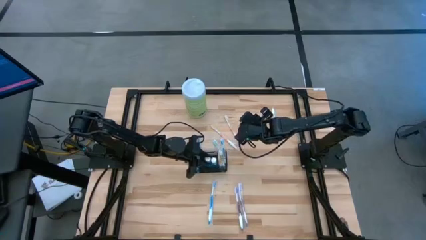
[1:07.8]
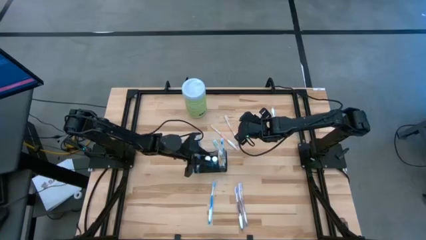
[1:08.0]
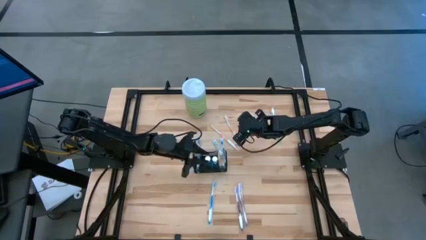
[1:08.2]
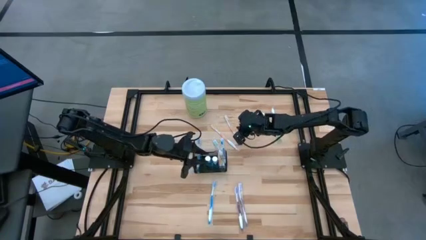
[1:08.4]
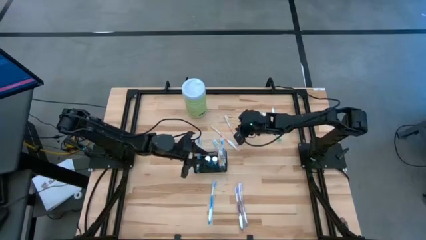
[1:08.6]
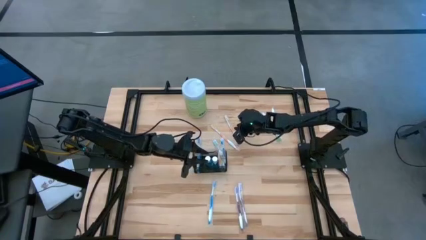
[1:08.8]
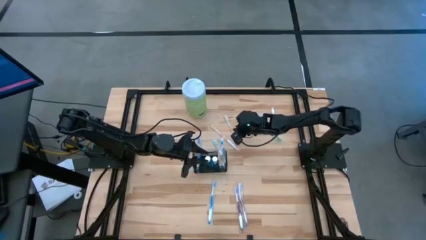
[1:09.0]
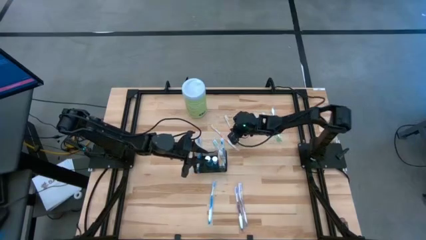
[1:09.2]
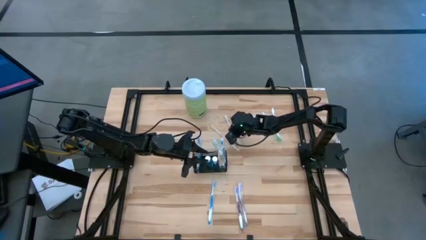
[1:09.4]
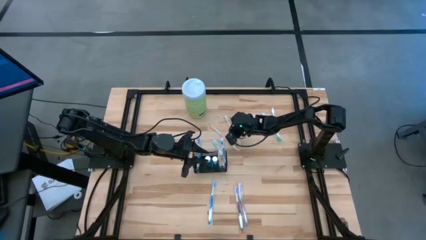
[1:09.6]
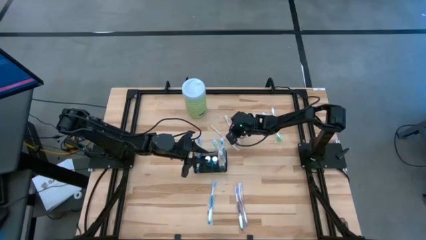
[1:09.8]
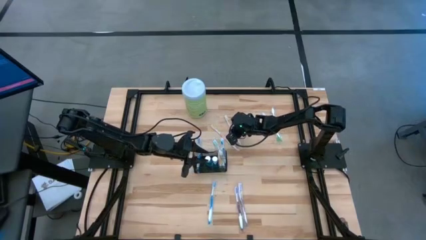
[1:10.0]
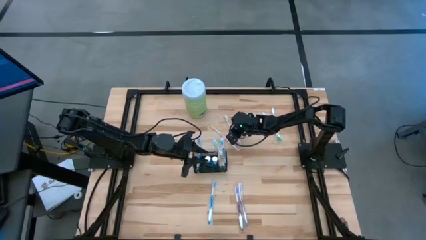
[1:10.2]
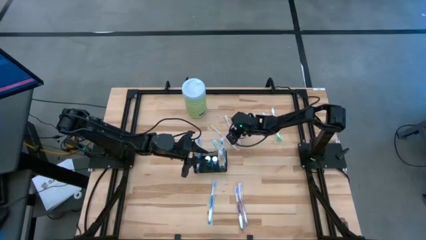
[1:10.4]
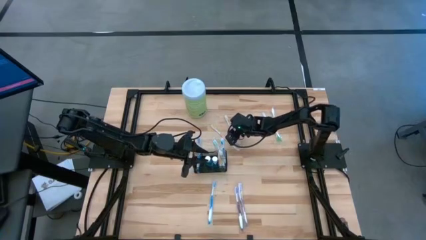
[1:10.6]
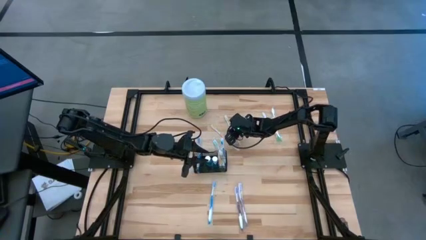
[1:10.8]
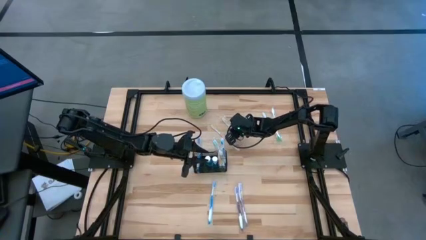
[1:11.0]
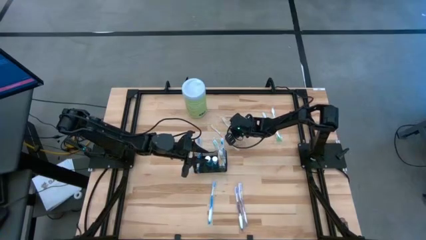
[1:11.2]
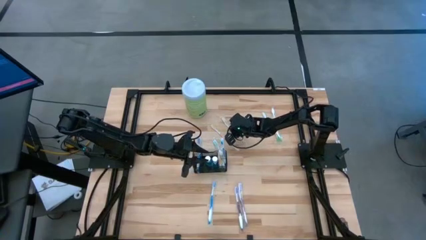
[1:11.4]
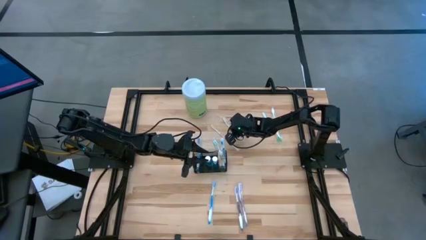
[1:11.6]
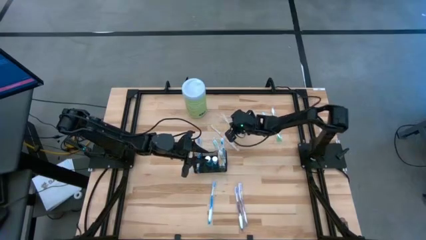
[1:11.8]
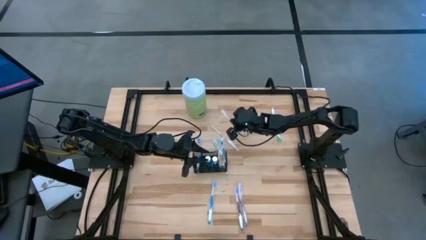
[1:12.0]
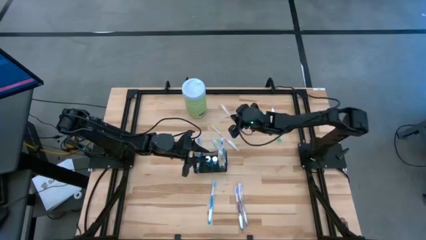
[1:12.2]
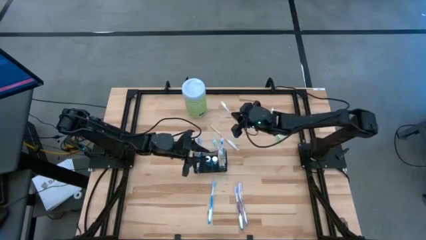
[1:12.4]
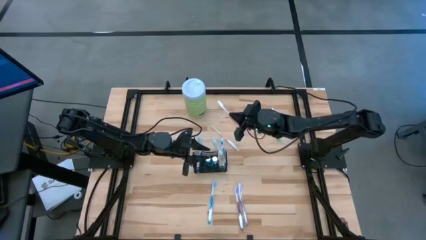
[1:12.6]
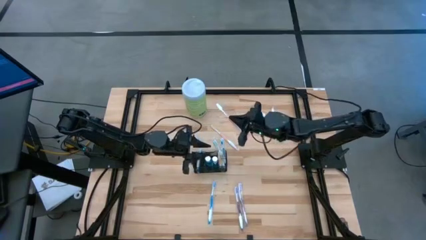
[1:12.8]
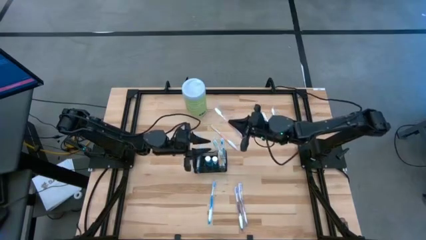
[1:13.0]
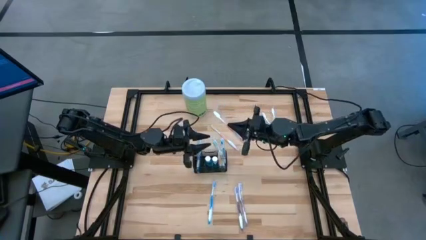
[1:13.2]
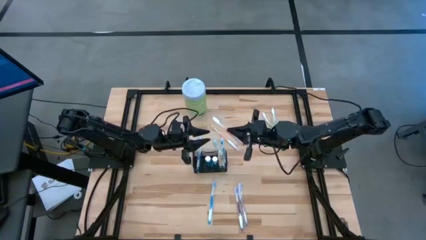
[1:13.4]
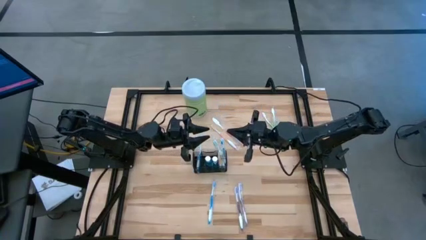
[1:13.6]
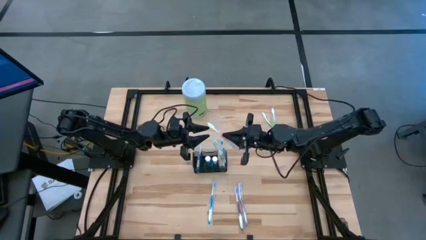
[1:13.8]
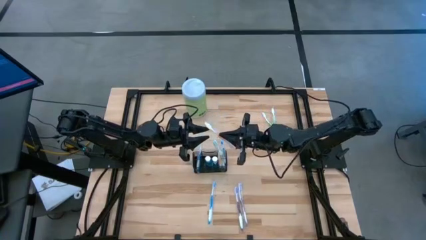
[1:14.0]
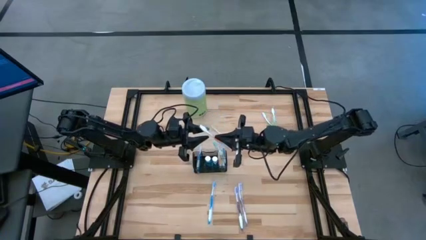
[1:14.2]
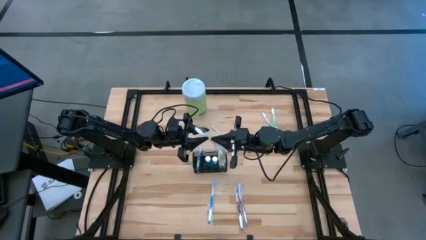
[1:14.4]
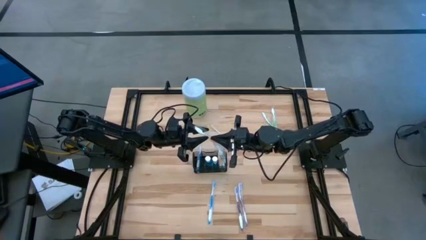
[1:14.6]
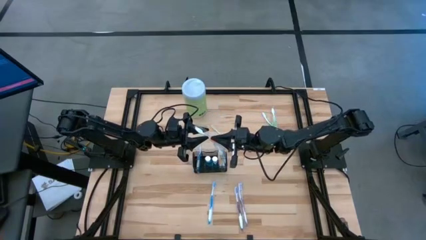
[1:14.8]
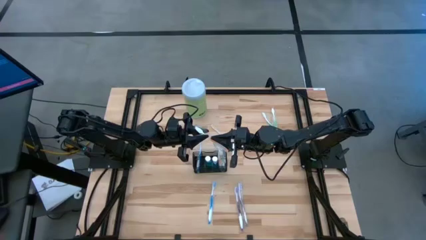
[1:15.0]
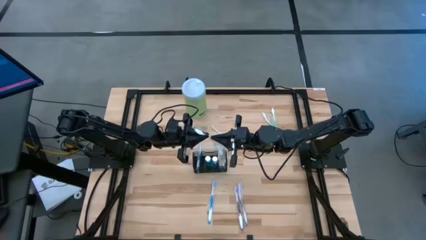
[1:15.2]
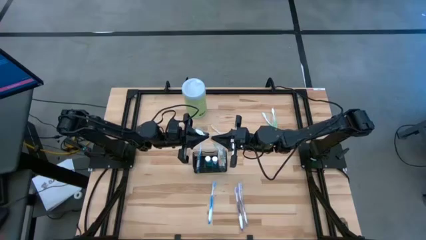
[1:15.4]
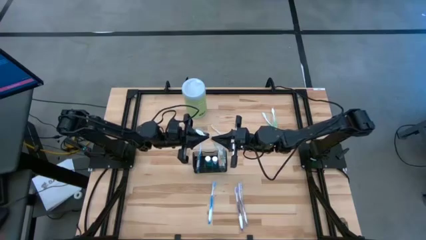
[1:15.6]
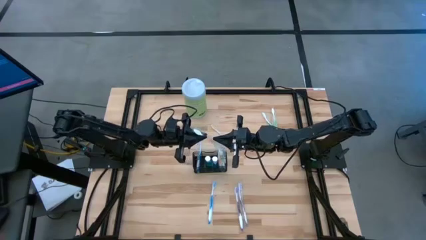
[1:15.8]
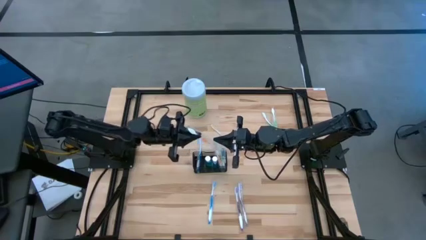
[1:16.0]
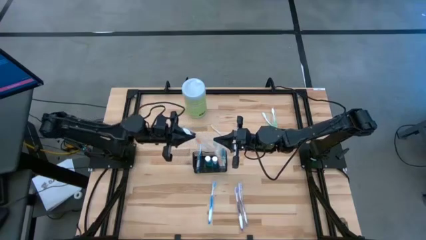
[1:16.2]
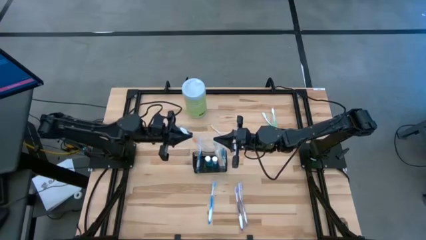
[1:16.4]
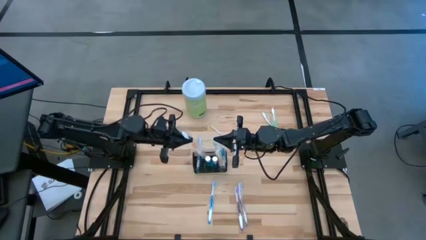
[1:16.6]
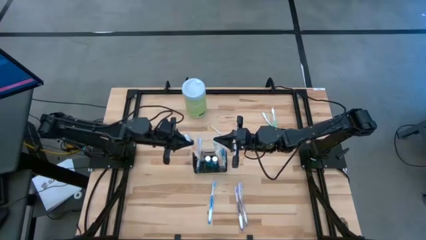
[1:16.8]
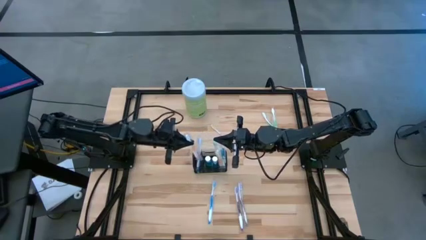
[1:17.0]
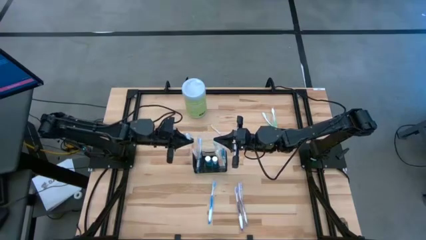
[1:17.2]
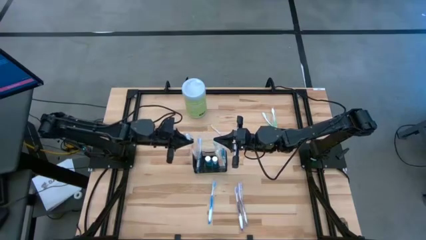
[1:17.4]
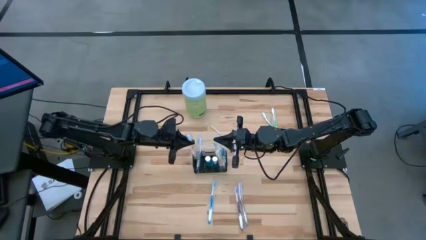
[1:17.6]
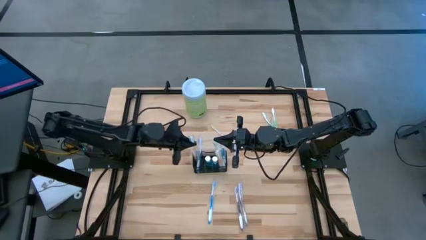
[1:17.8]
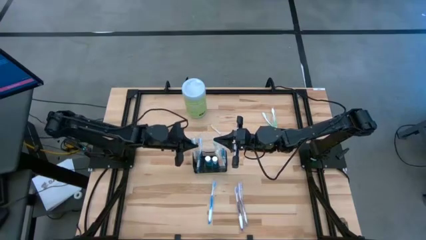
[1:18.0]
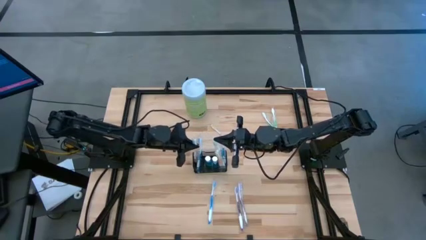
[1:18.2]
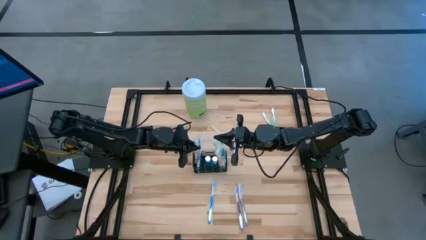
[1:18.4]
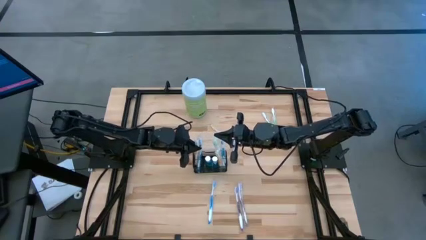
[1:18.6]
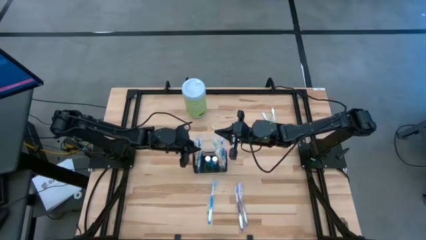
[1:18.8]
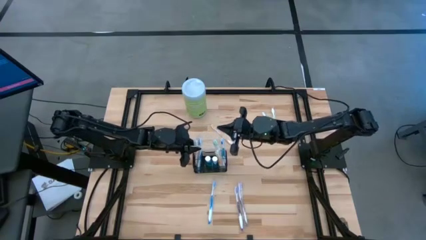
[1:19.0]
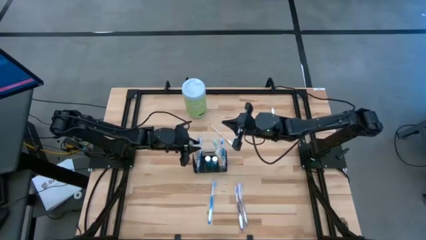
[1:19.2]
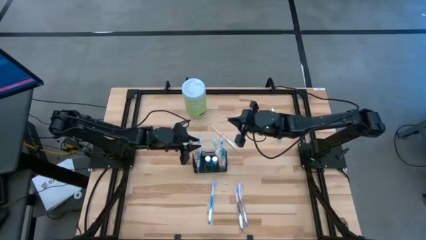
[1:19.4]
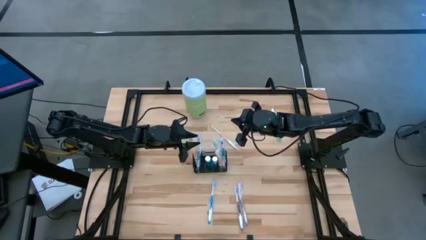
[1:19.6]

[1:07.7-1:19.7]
Task: Pick & Place toothbrushing station
Put the right orange toothbrush into the wire organizer
